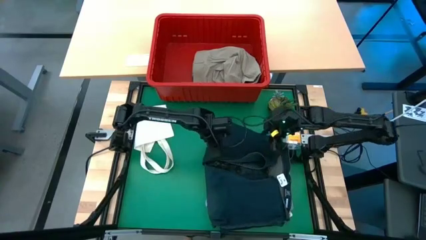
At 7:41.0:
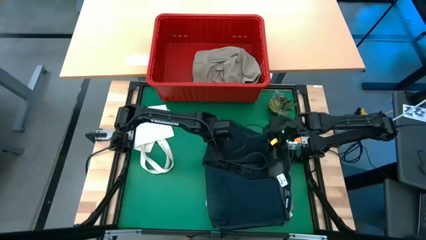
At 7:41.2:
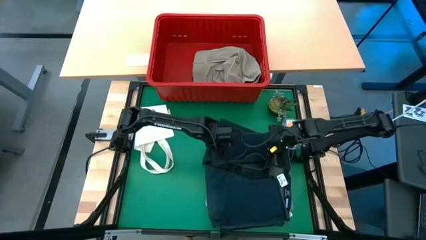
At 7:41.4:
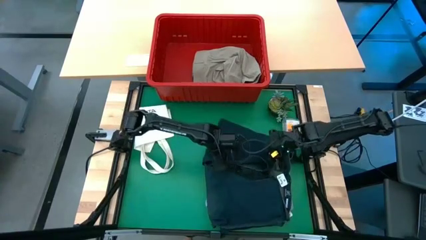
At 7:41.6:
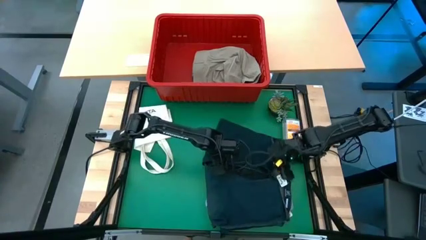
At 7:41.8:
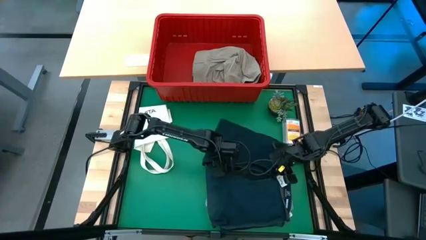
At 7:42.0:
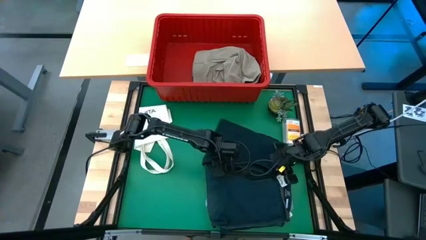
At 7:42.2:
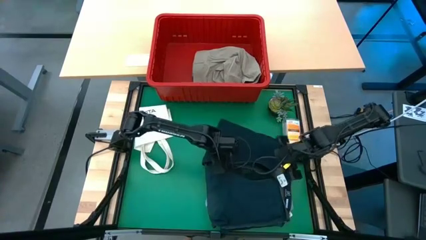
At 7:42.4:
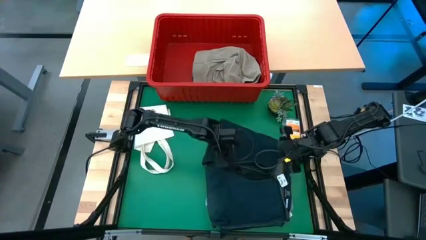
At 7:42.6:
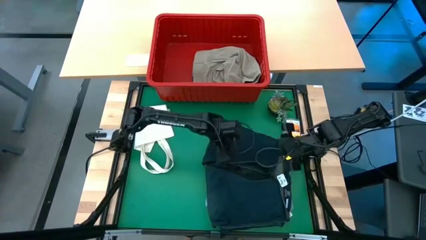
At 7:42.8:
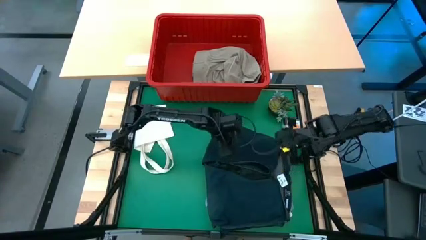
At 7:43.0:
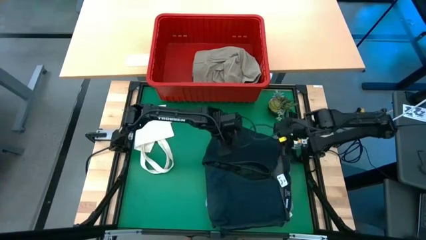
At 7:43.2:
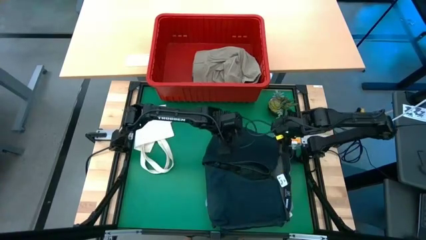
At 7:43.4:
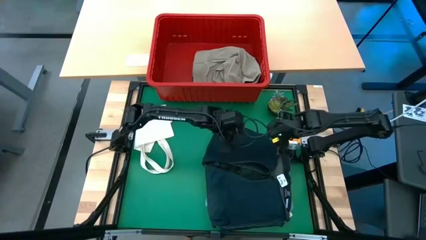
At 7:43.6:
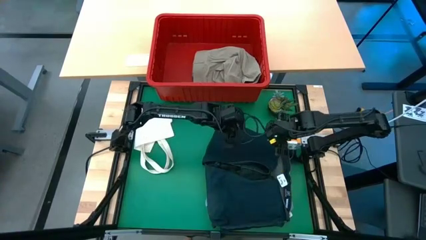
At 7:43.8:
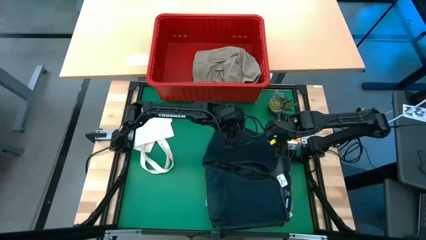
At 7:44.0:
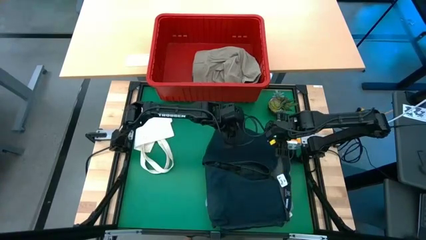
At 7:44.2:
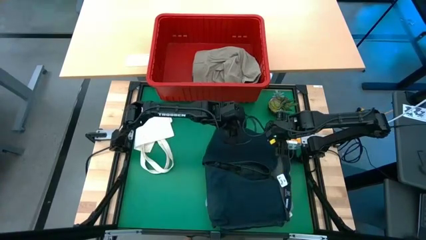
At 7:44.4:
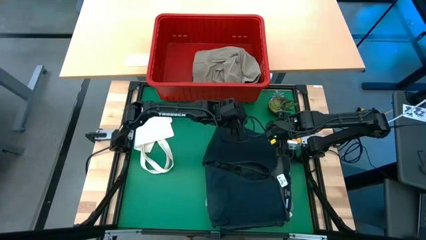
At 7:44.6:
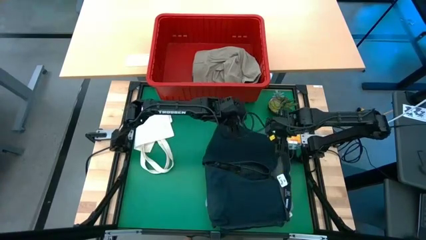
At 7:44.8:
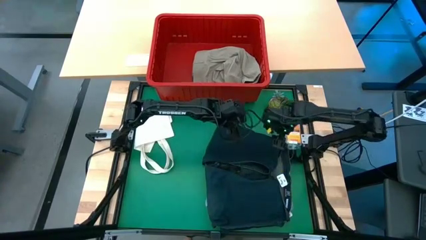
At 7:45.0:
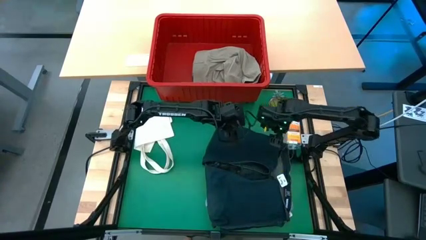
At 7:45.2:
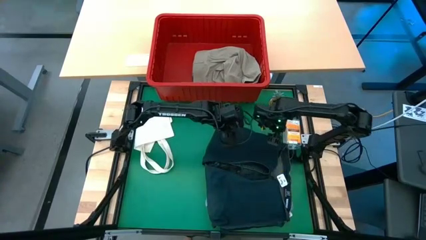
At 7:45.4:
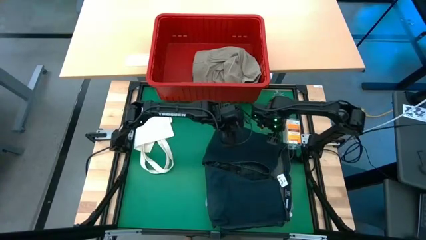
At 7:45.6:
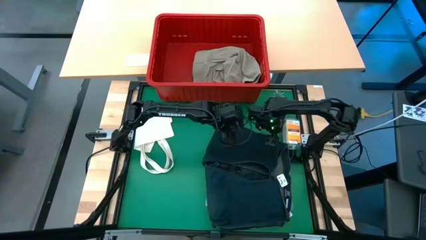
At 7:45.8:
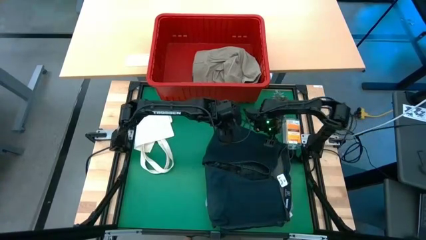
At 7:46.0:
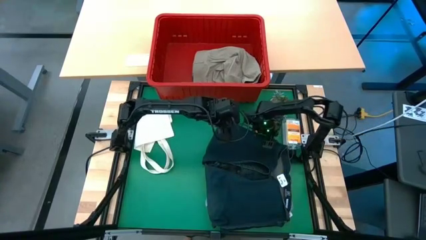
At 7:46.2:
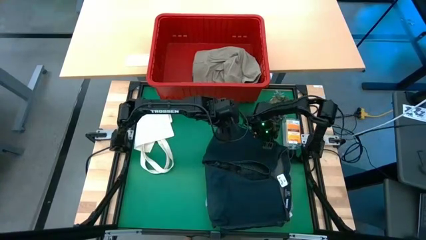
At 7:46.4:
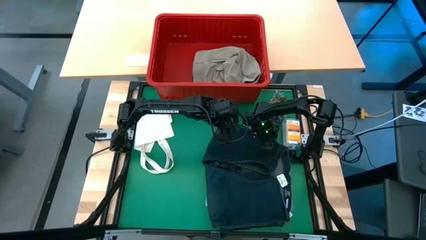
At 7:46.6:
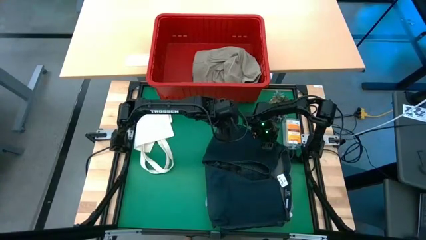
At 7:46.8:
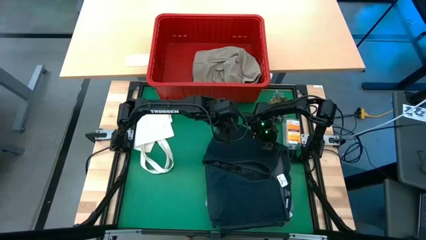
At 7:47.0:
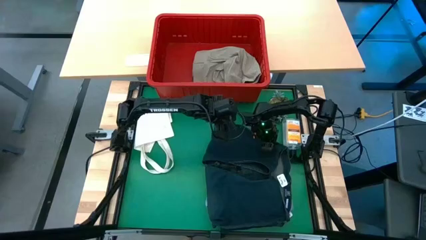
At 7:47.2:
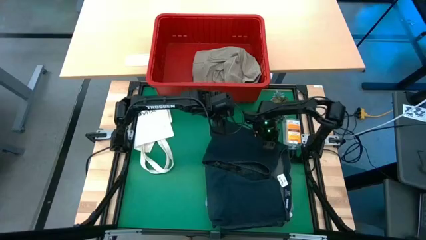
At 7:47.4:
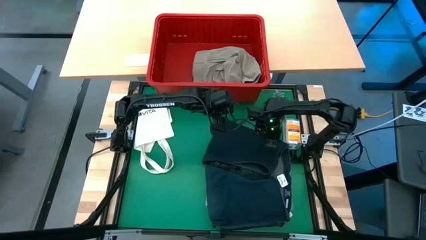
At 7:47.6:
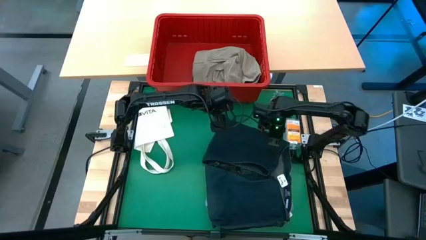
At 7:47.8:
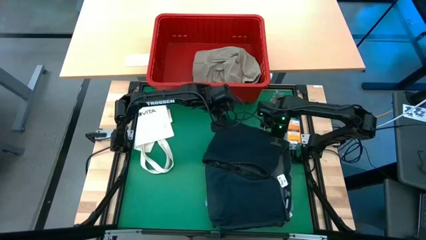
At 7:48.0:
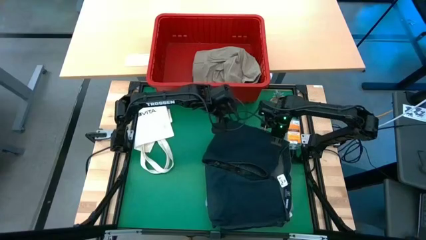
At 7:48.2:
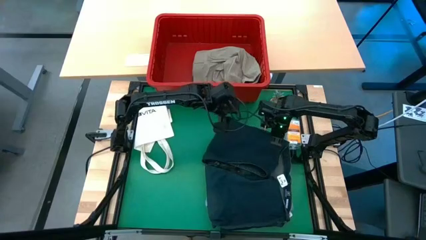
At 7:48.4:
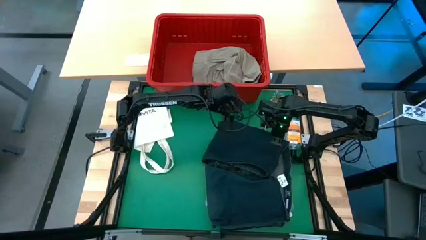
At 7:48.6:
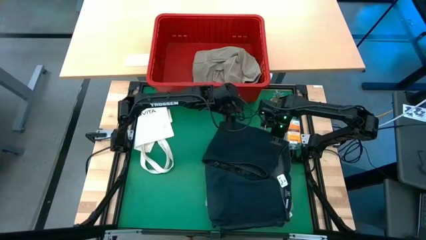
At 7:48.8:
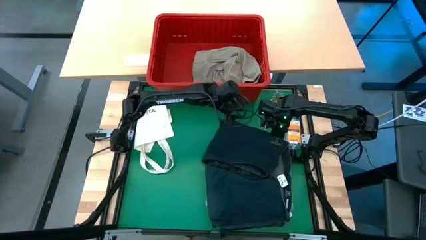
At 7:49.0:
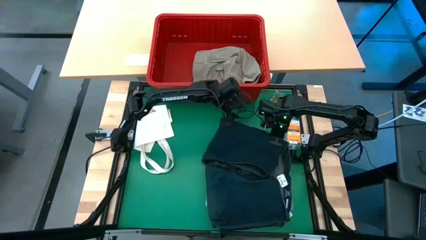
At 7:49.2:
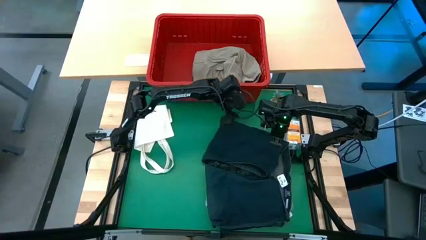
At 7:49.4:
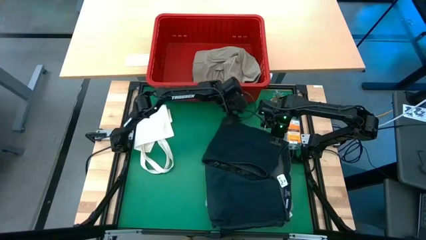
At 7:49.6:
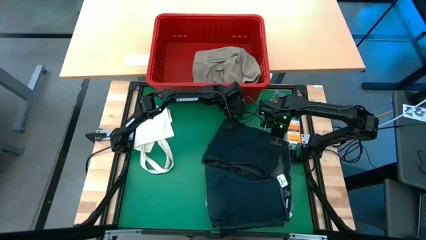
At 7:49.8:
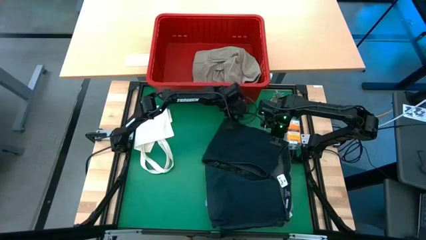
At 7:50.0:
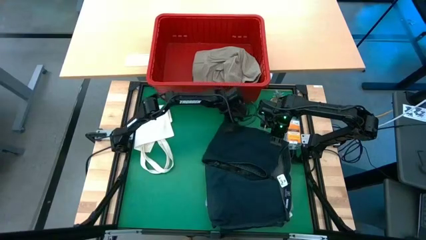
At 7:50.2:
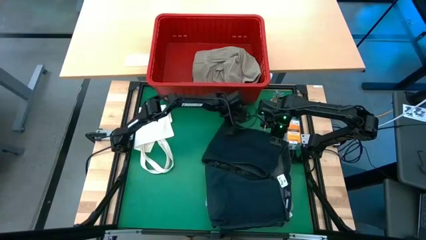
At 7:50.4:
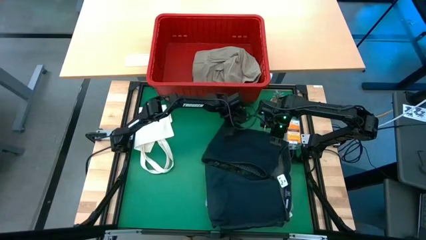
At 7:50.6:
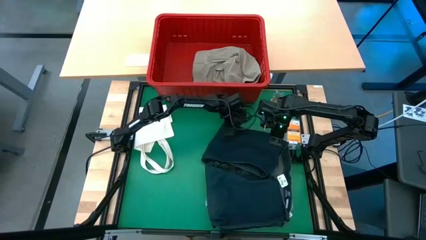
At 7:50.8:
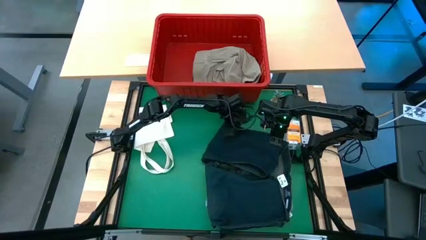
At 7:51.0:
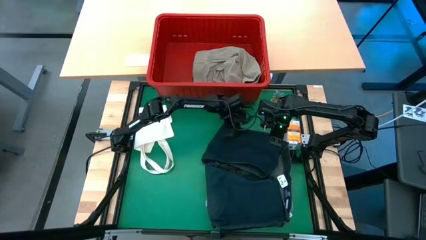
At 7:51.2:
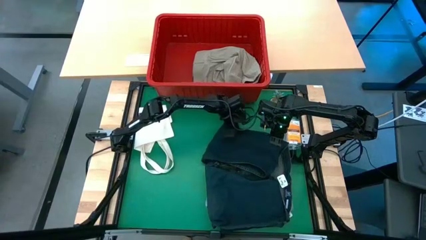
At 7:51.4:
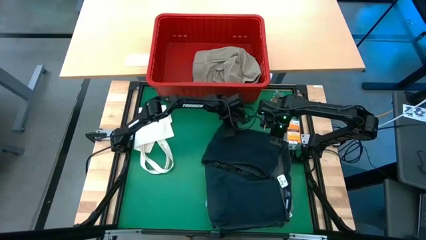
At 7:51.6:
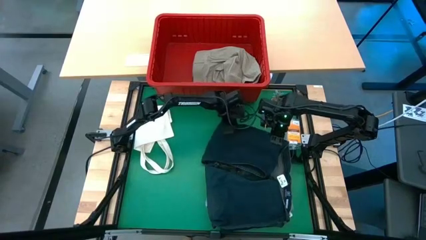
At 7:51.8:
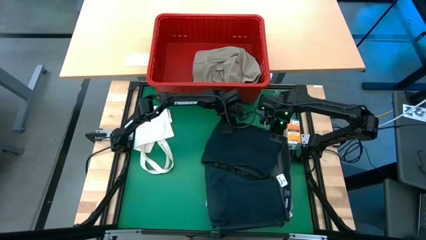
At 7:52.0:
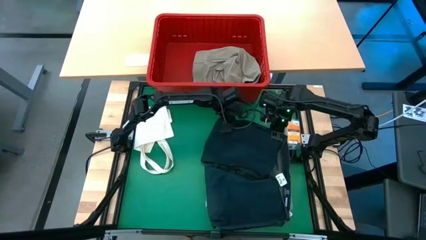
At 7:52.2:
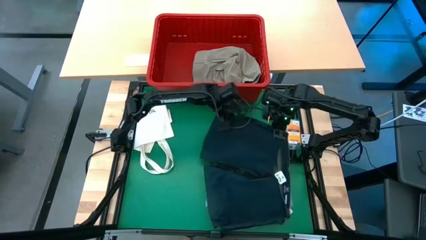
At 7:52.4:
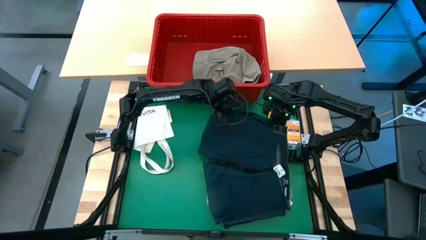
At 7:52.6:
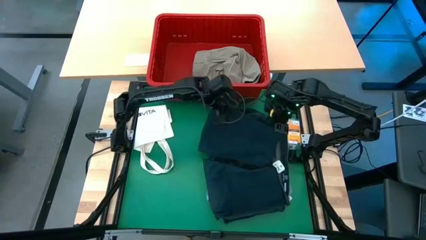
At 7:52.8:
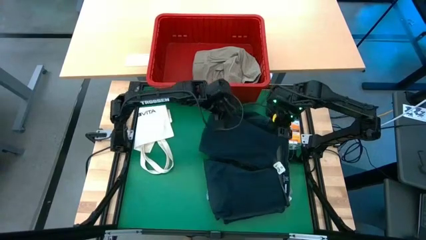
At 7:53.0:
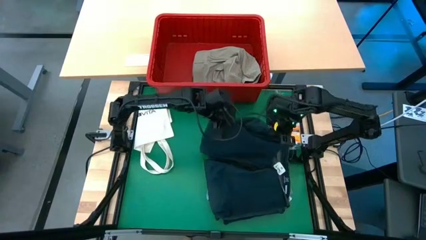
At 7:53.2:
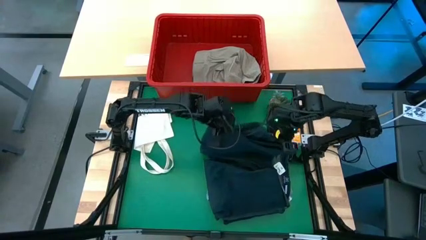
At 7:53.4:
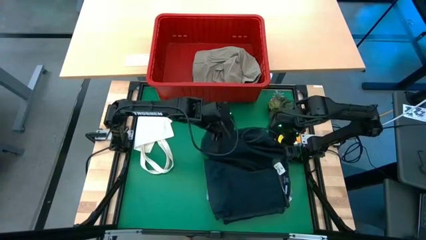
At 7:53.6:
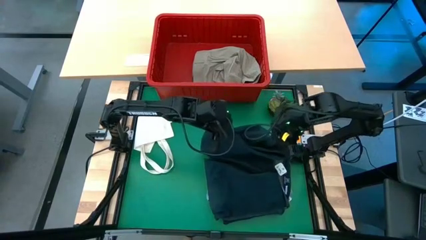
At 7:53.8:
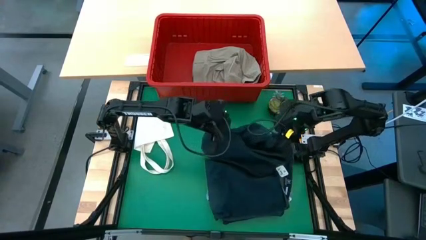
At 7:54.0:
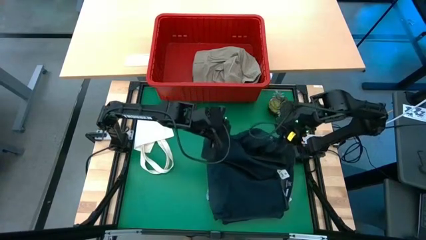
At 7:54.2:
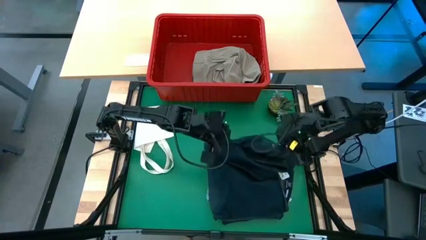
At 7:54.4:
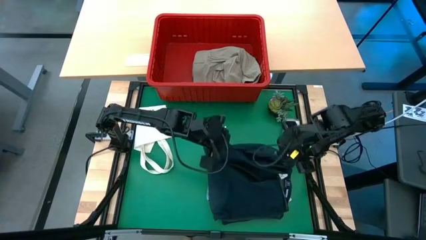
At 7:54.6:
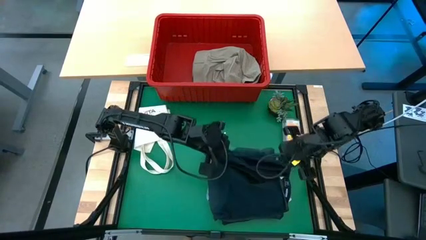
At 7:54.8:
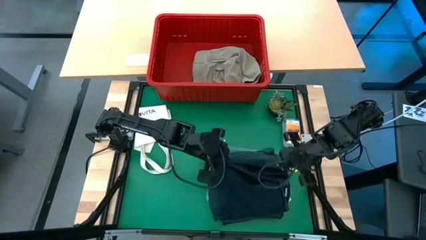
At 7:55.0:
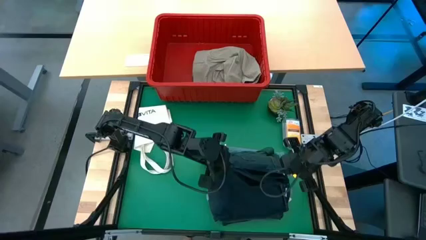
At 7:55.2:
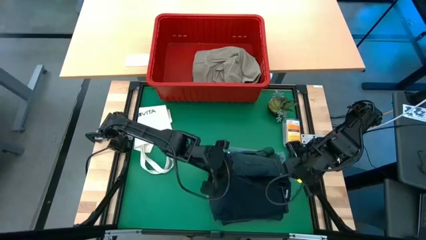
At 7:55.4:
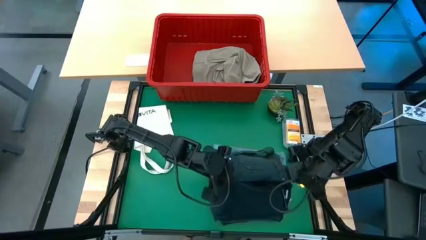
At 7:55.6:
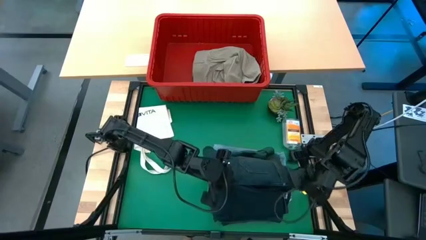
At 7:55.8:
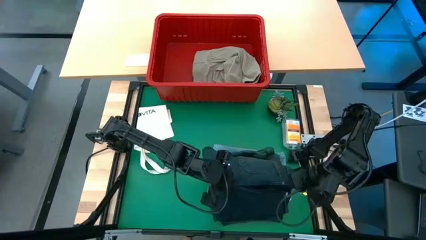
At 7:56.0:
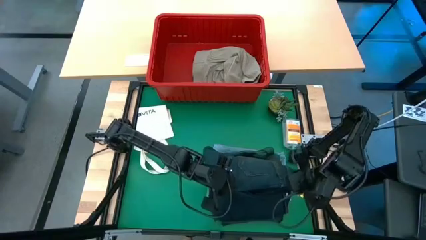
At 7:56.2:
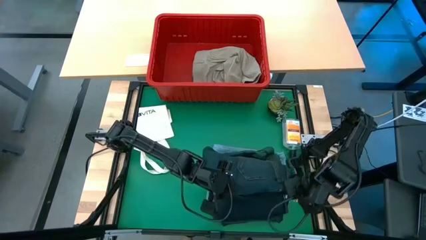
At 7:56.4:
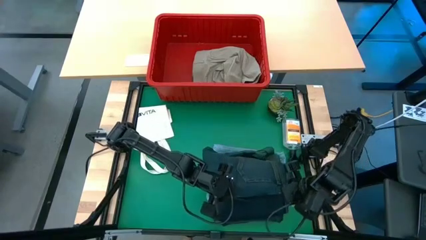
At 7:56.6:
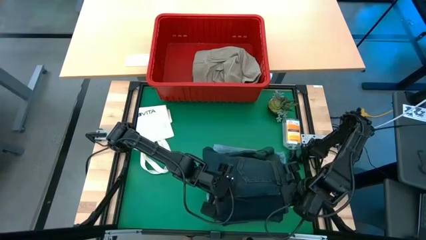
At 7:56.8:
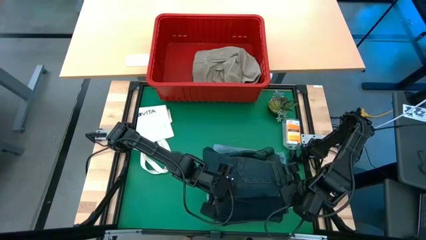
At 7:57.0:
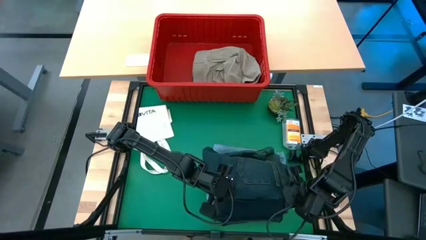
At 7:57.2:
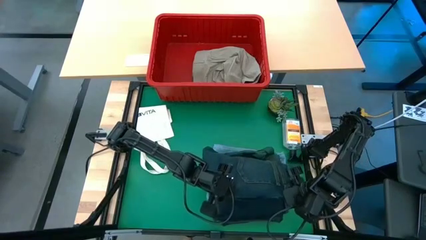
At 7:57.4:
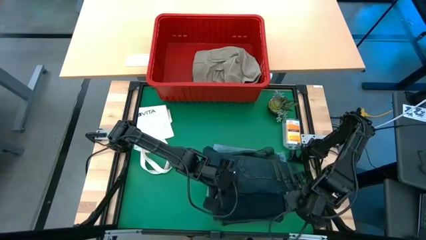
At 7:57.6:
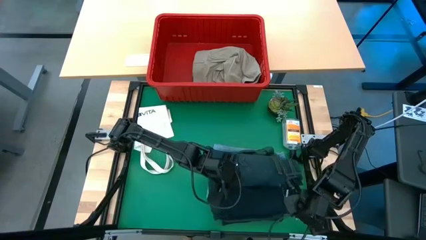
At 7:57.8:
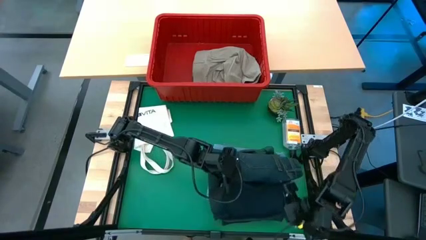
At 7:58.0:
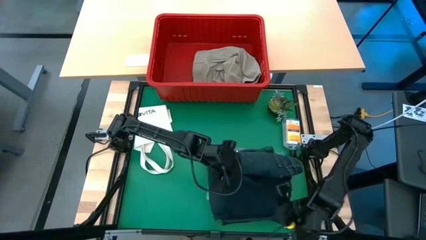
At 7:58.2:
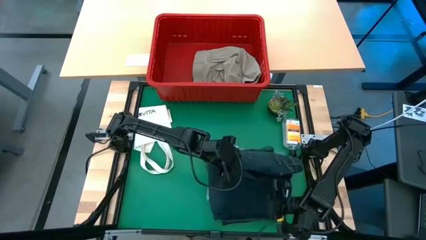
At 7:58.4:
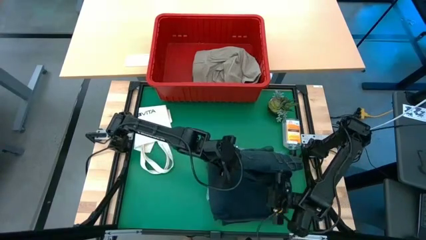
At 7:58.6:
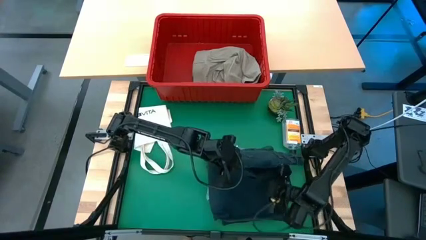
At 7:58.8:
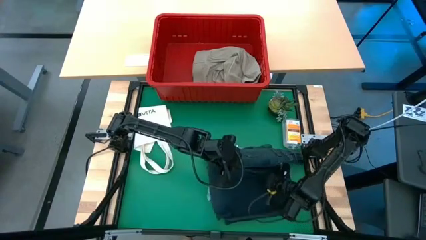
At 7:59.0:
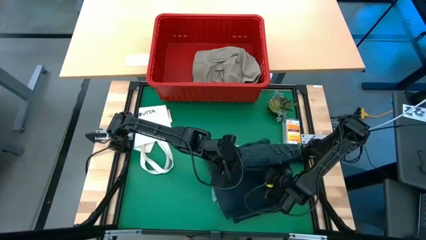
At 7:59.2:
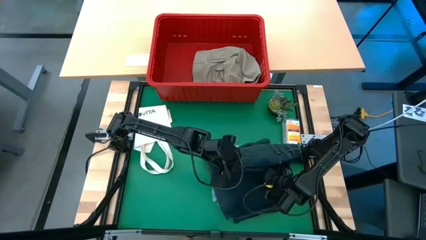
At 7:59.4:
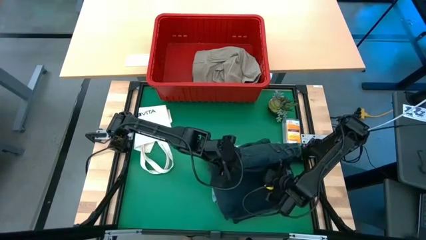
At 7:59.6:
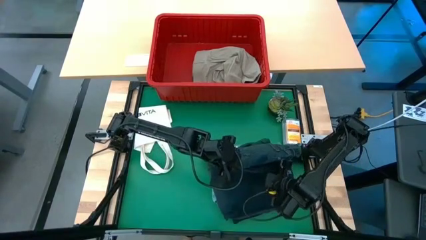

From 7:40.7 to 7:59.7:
Task: Fold Laundry from Bin
Fold the dark blue jeans
